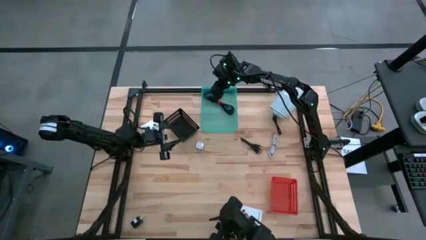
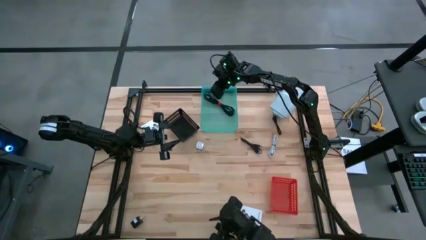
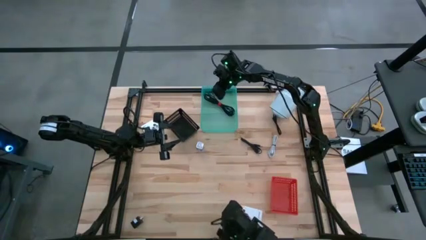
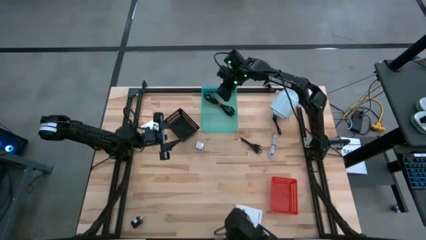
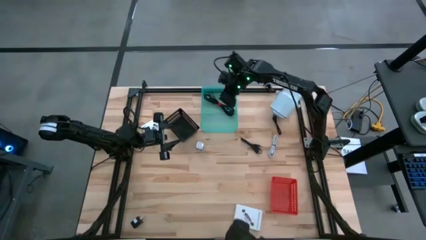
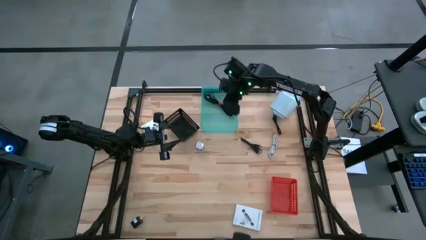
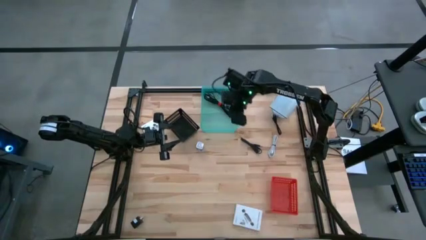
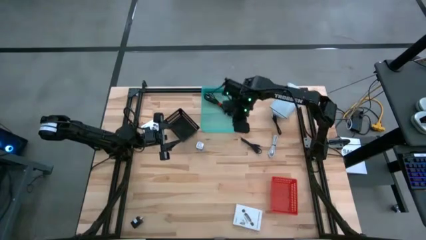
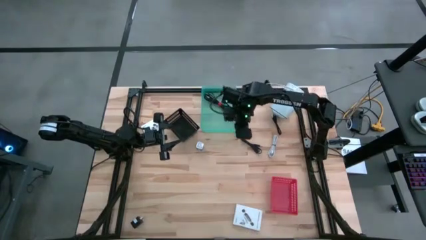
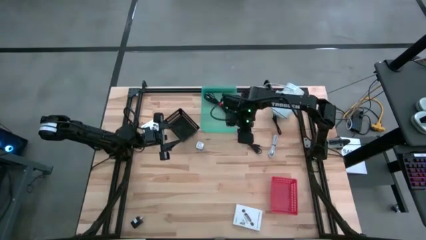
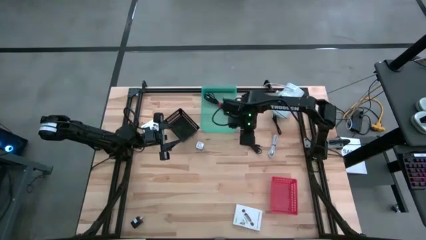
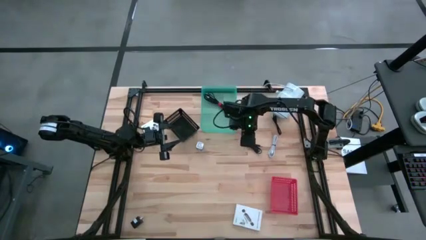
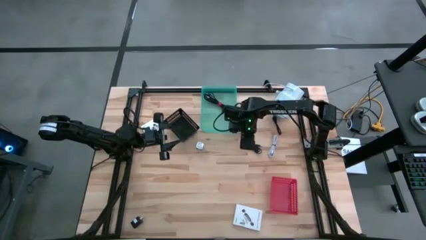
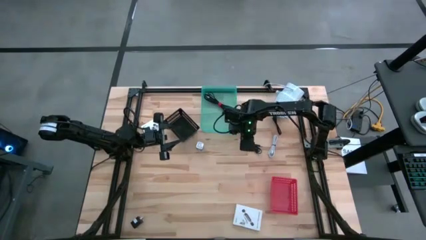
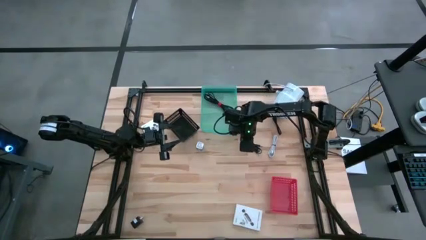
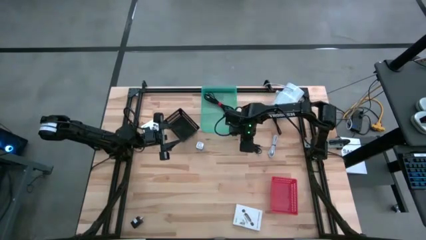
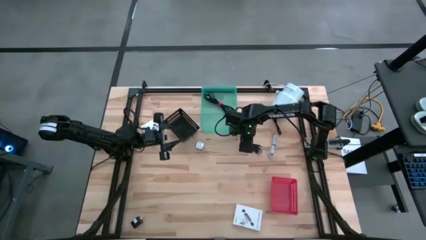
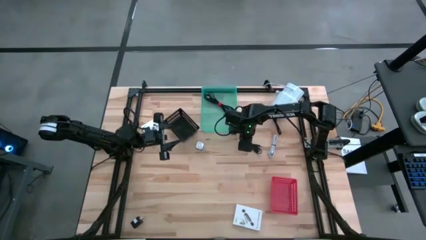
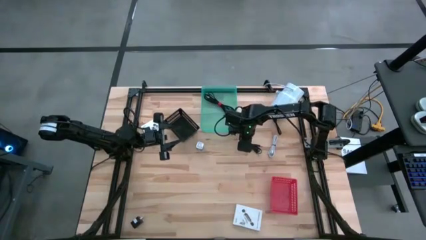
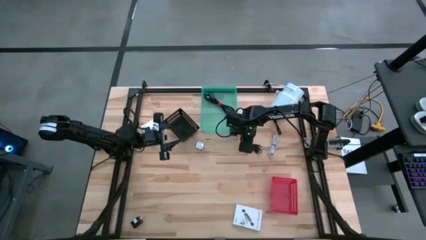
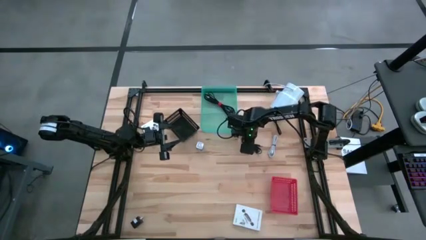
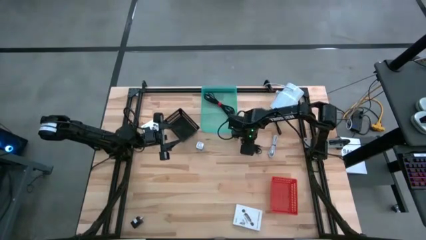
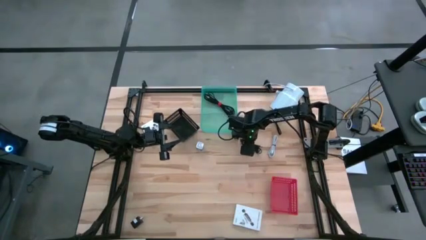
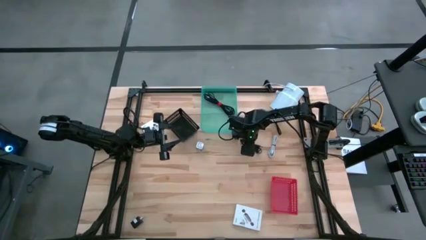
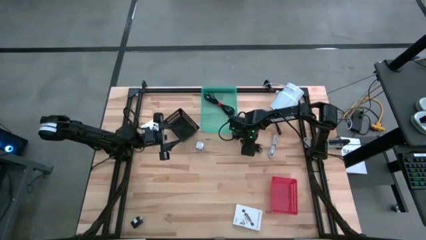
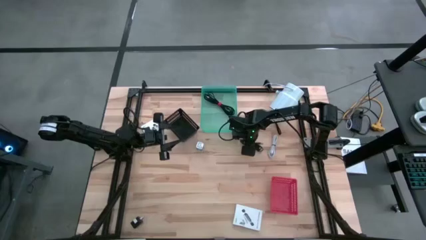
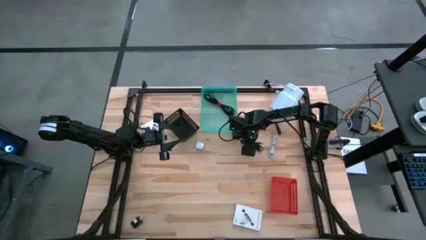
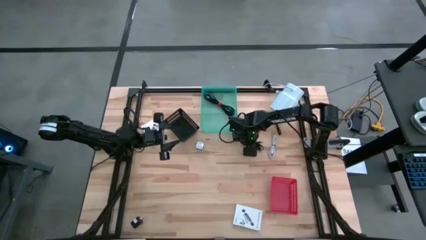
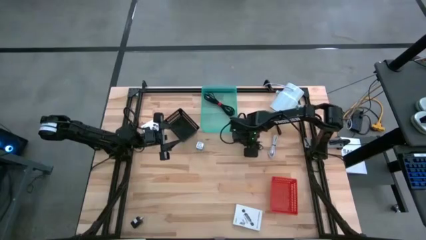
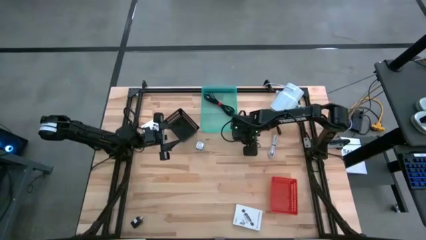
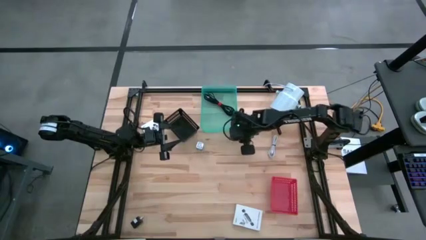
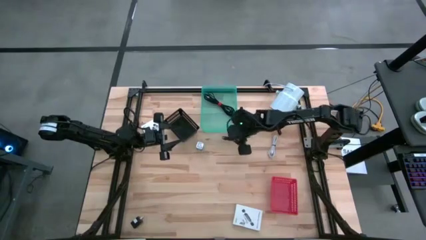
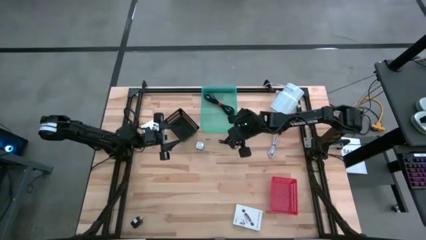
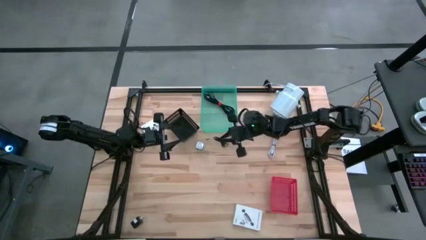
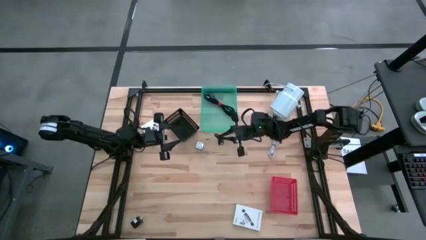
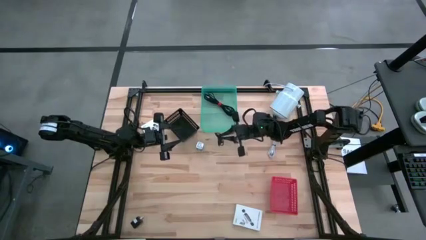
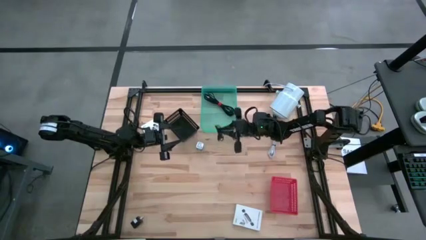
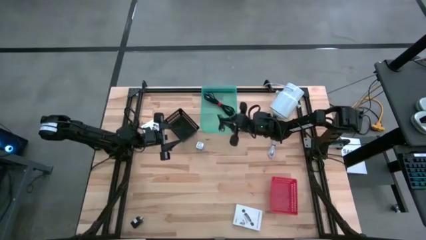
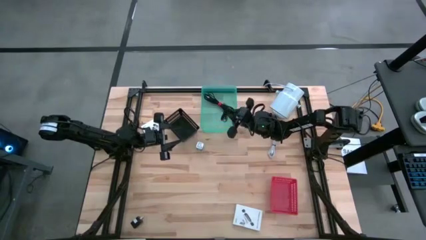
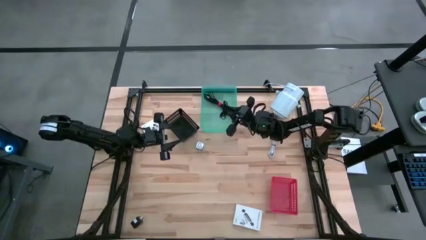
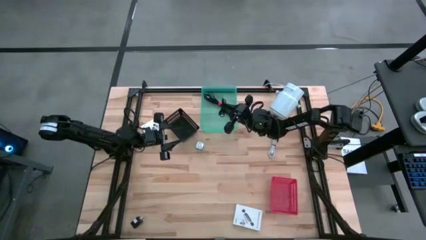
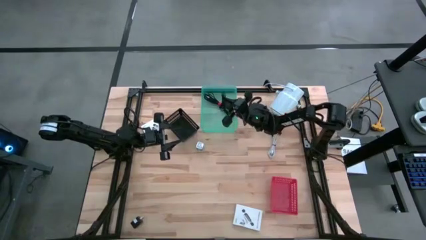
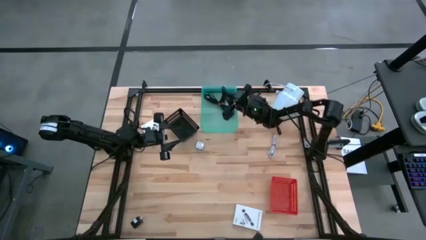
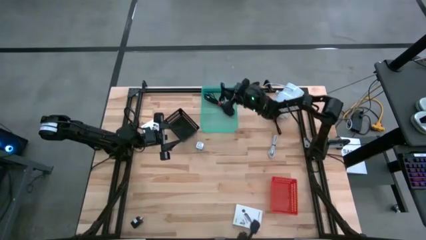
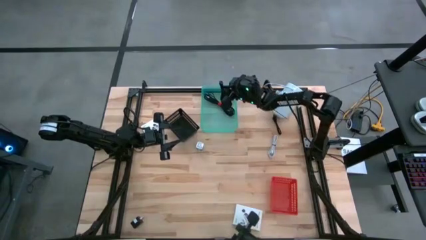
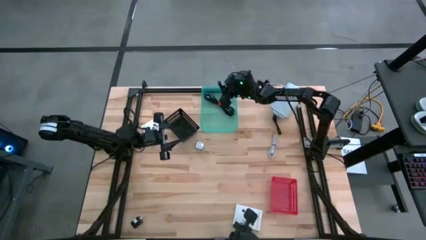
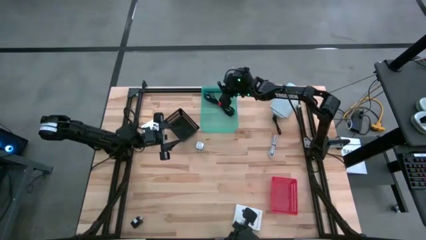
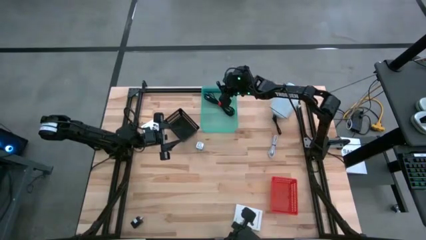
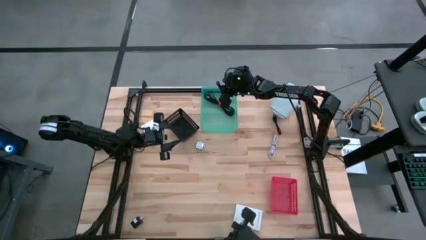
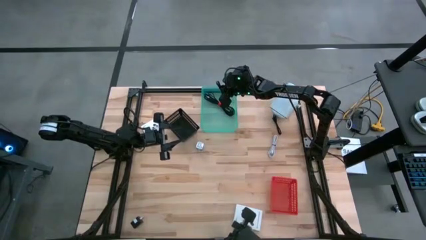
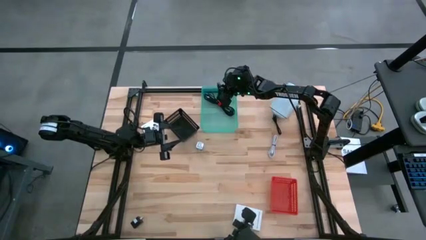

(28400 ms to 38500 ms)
Task: Pick and place items into bin
Put the bottom black charger cable into the green bin
